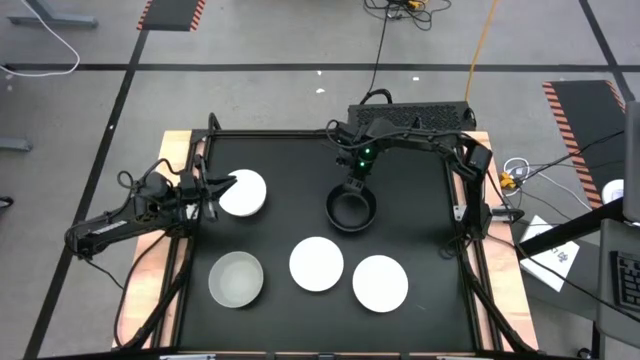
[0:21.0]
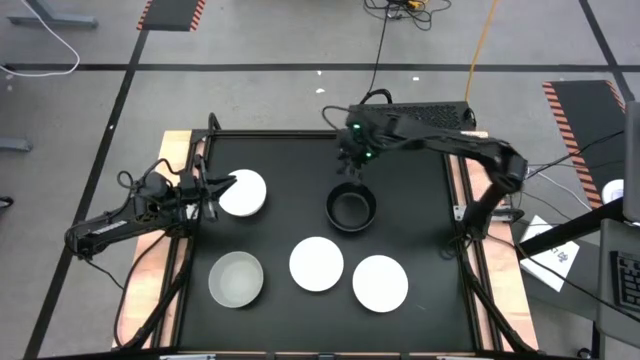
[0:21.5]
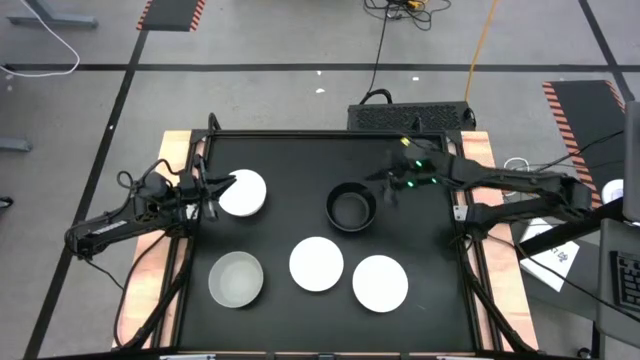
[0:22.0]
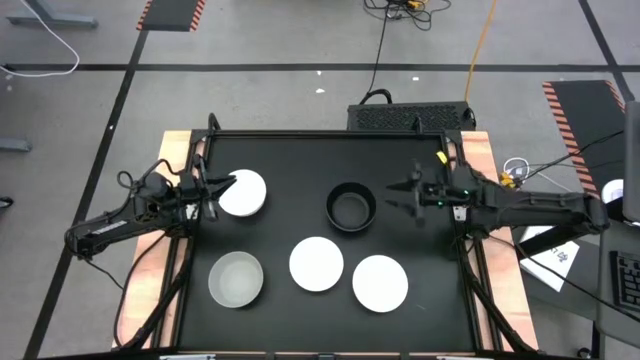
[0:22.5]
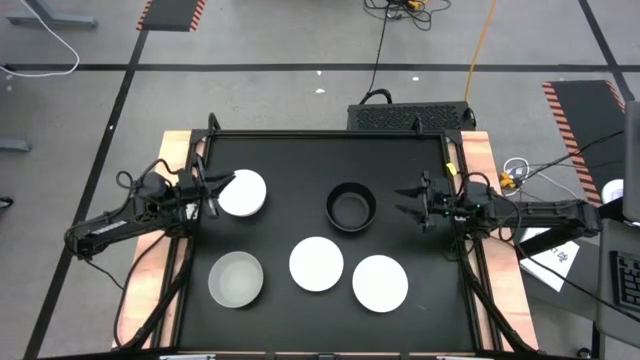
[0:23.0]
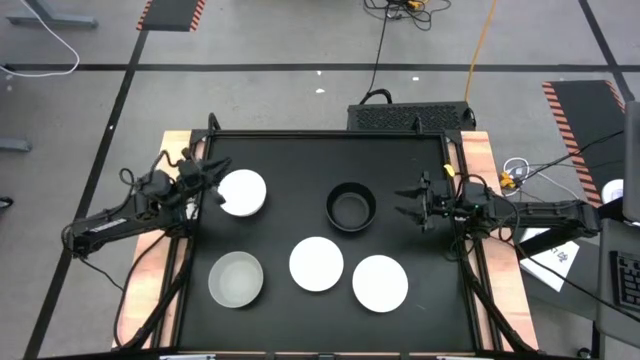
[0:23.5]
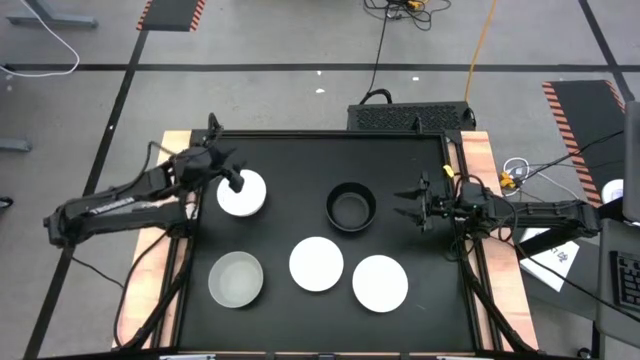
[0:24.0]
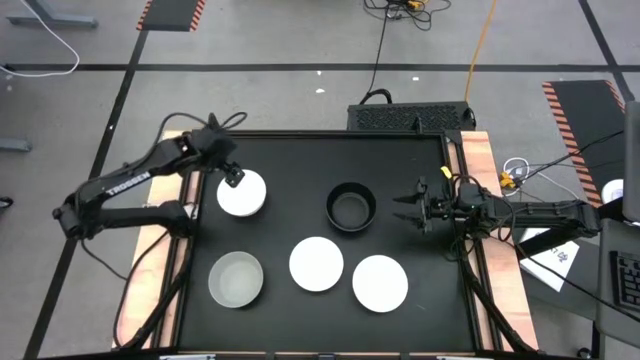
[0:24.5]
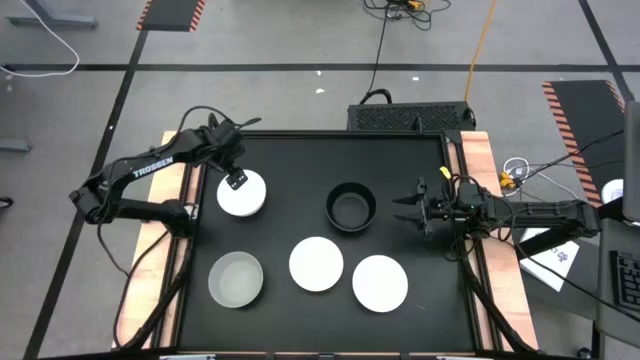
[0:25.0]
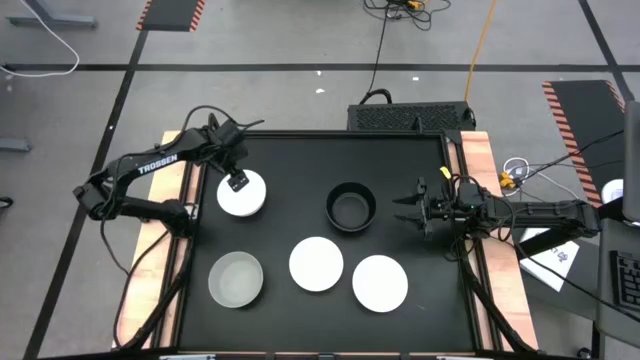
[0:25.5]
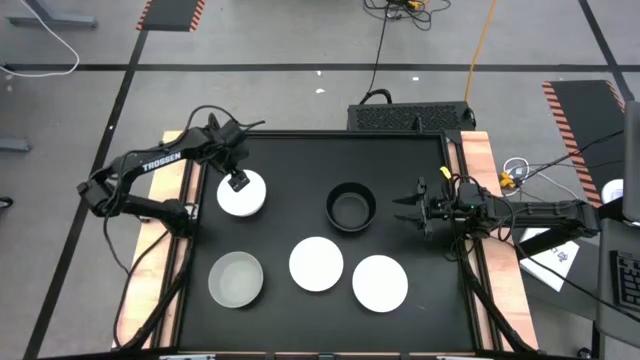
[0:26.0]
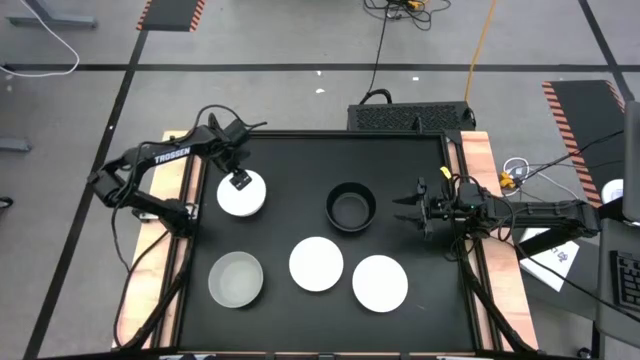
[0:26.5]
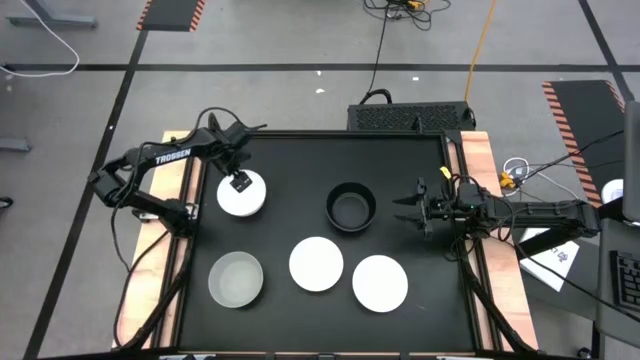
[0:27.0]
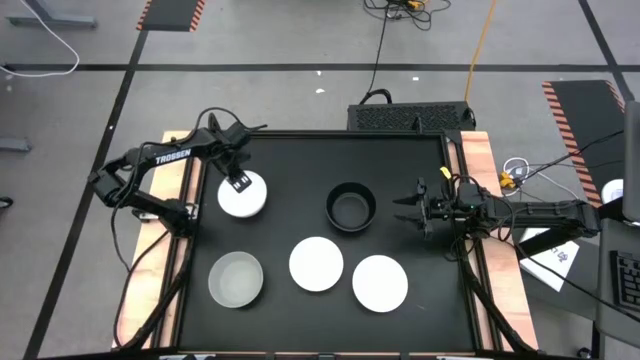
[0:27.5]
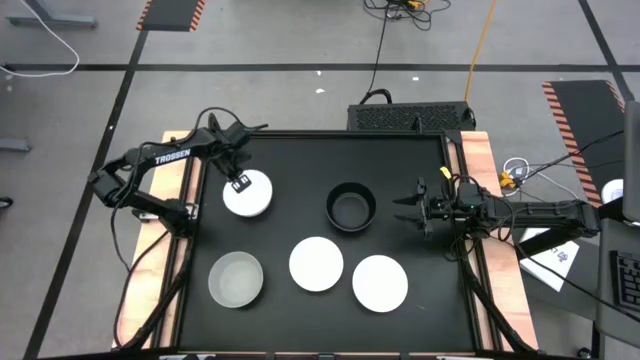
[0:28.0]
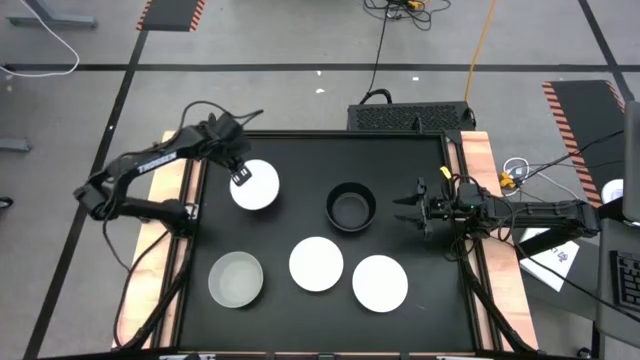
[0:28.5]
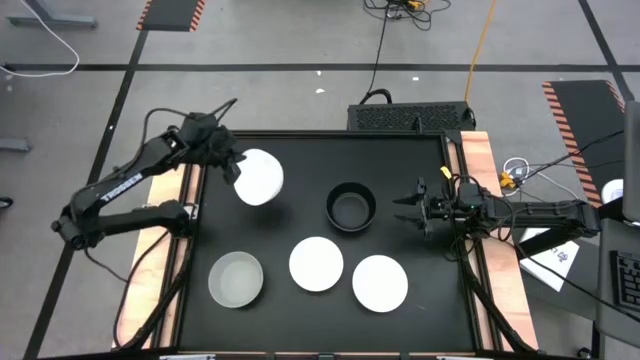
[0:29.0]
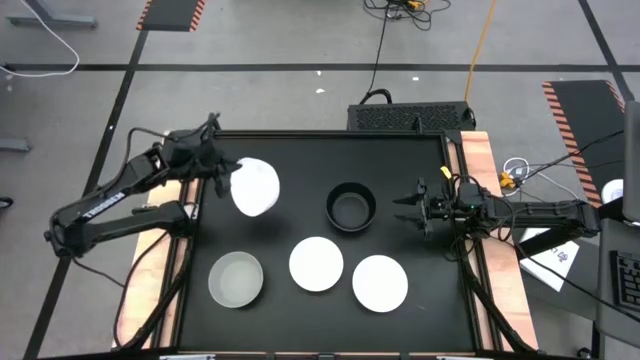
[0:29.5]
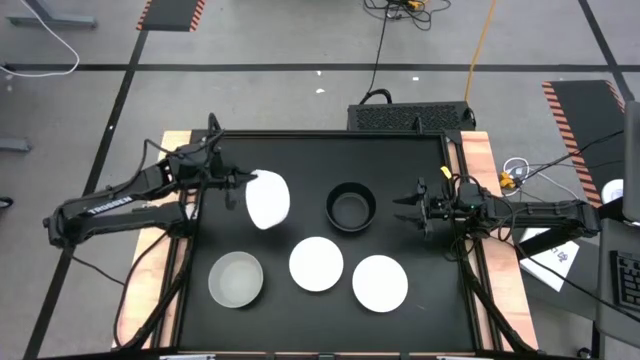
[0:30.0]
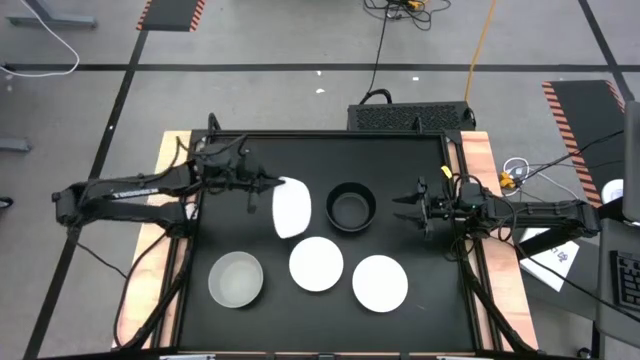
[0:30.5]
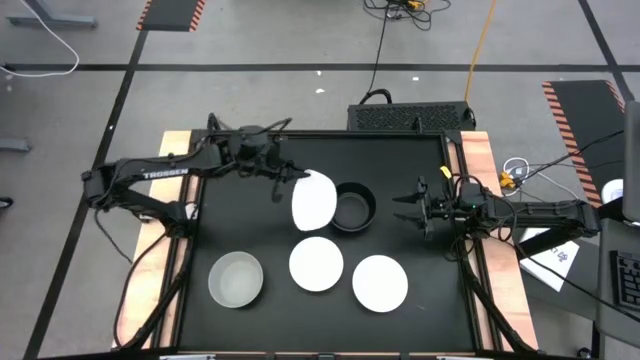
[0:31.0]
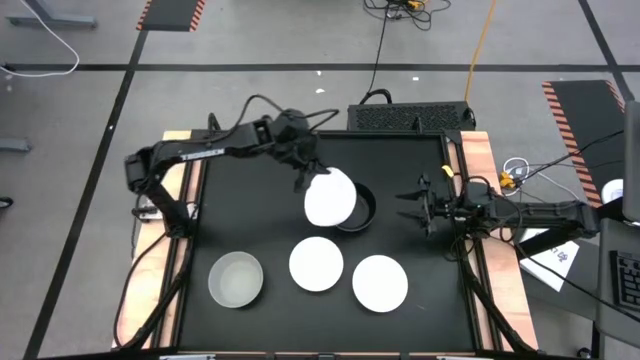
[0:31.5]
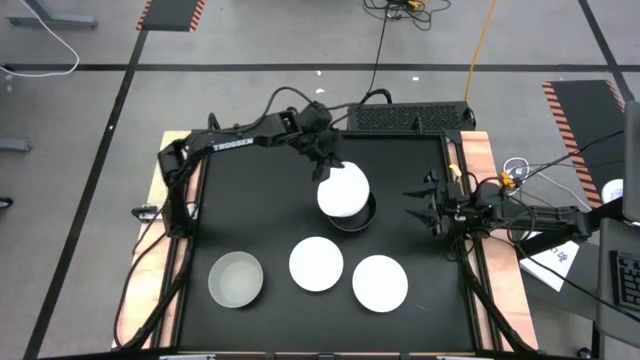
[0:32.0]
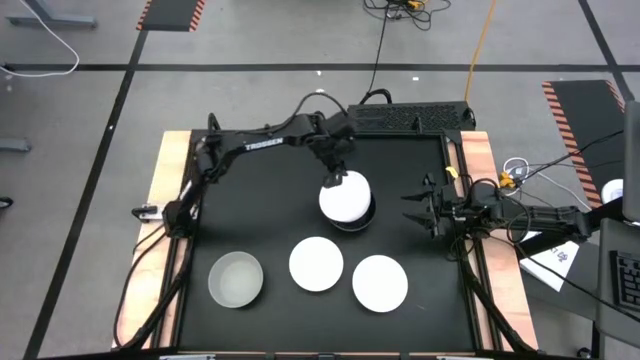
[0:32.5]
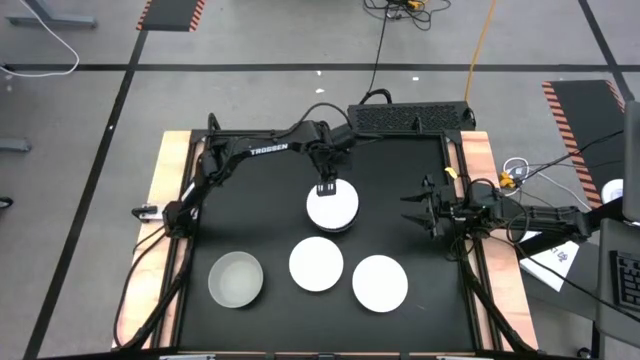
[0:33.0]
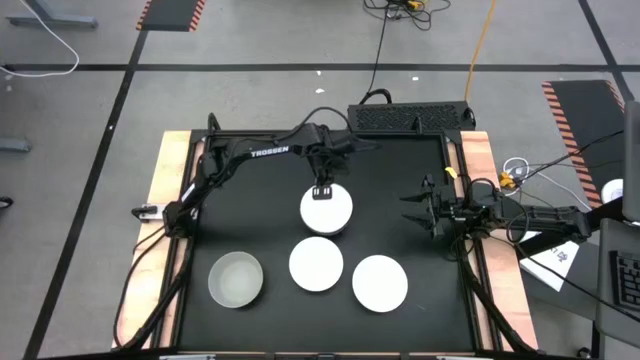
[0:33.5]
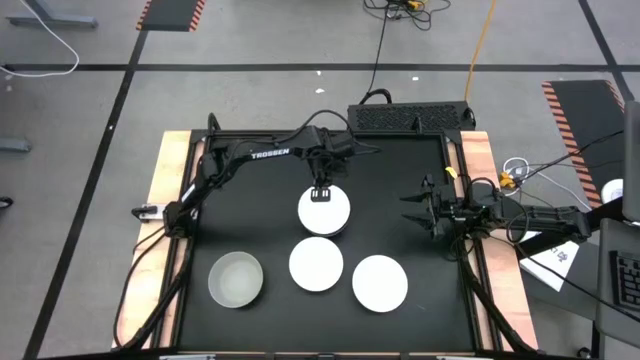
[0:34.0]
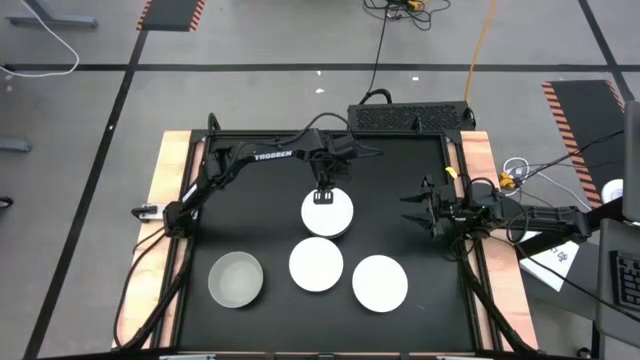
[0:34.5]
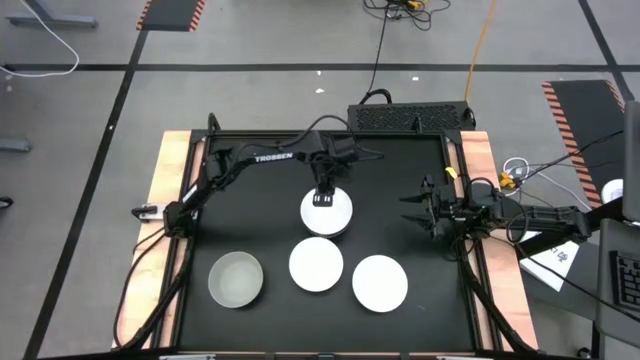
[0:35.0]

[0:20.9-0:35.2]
Task: Nest bowls inside each other
Stack the top left white bowl on the black bowl

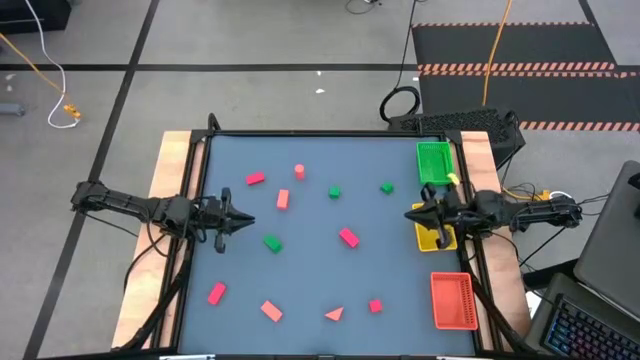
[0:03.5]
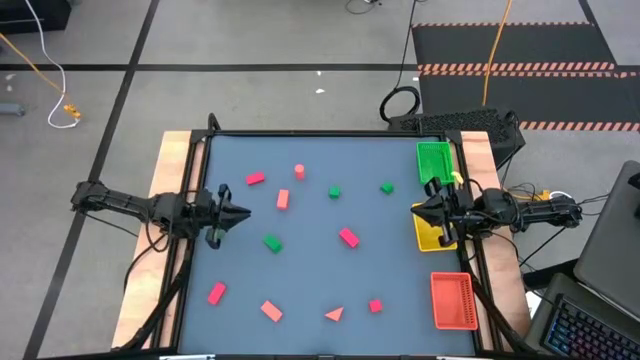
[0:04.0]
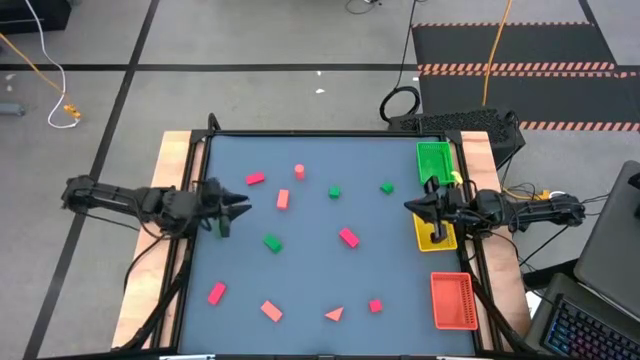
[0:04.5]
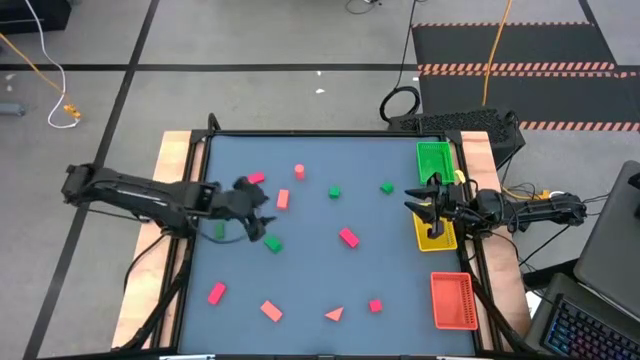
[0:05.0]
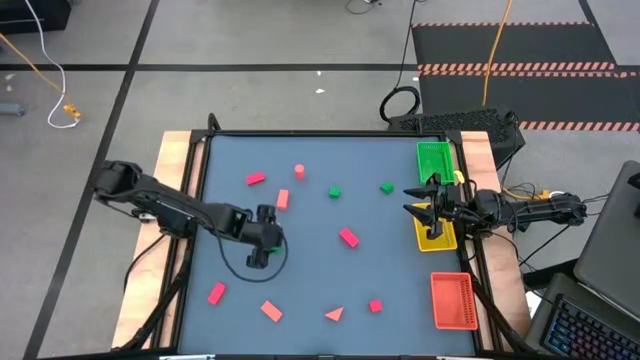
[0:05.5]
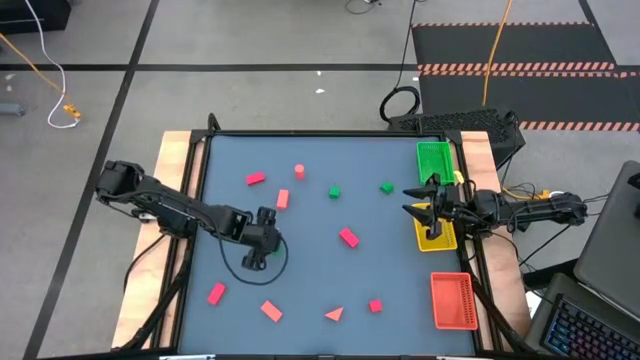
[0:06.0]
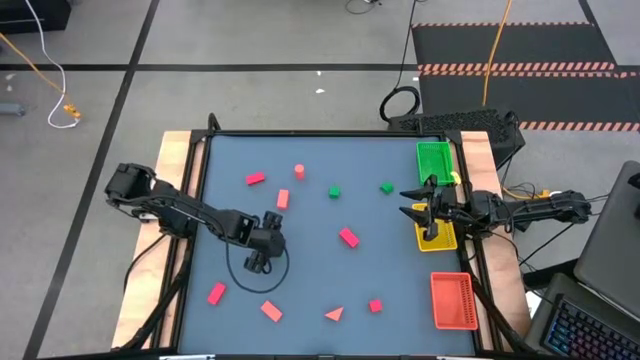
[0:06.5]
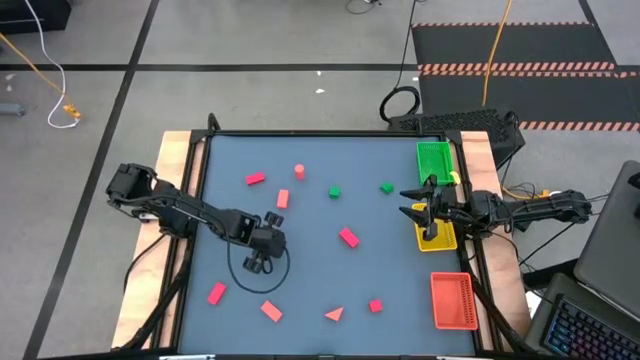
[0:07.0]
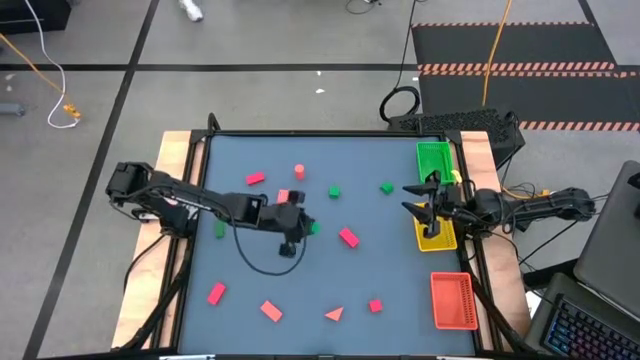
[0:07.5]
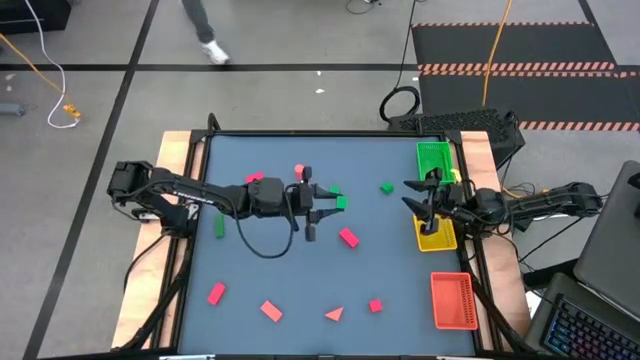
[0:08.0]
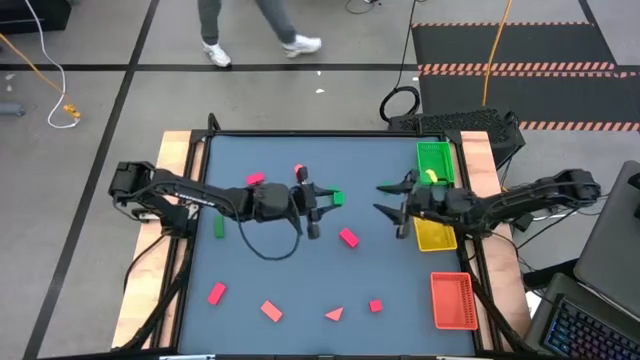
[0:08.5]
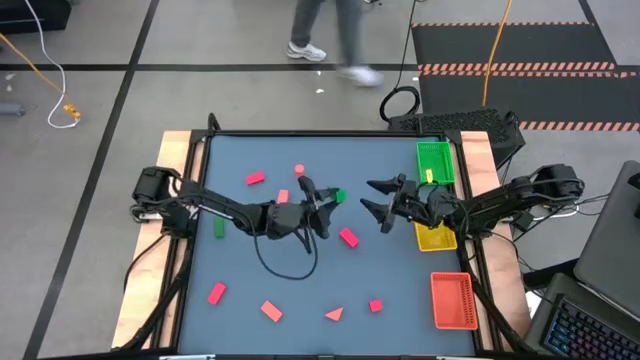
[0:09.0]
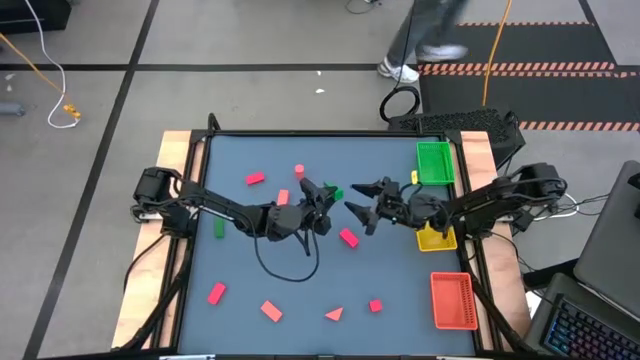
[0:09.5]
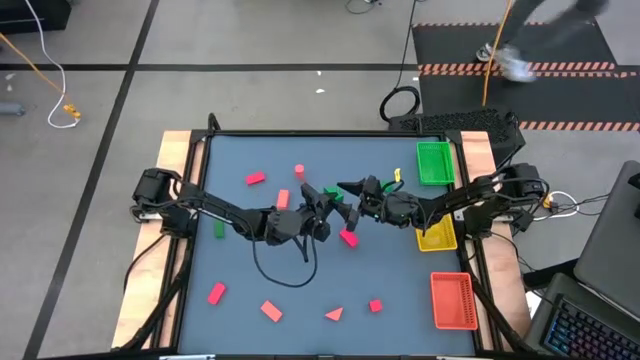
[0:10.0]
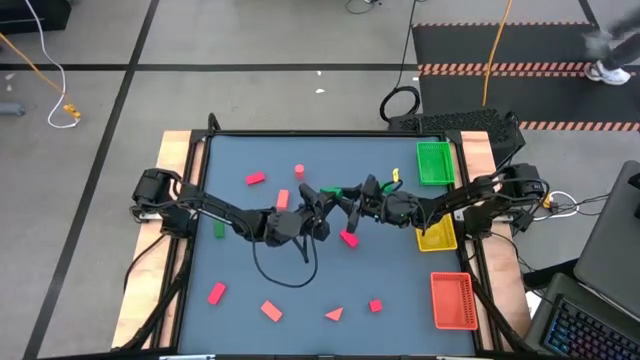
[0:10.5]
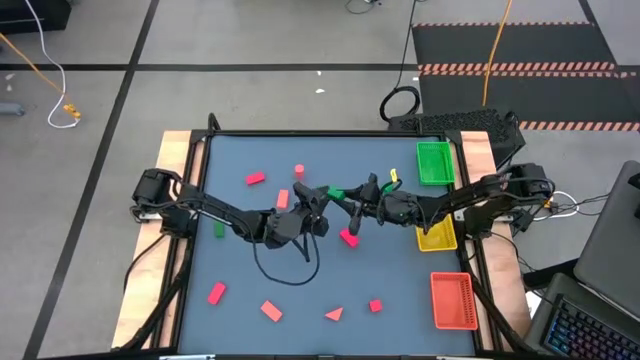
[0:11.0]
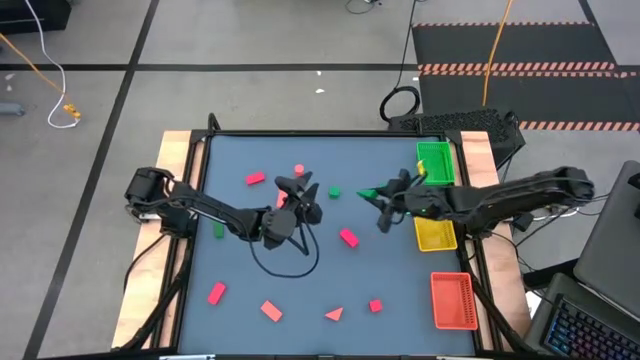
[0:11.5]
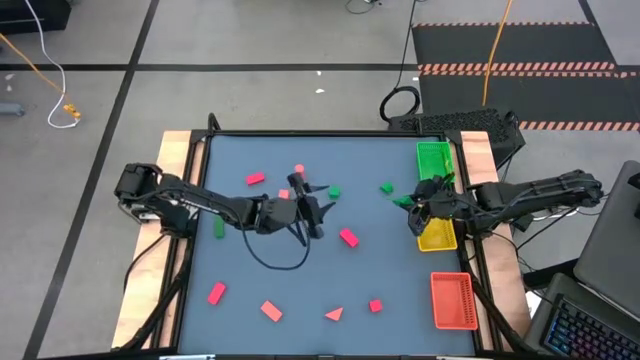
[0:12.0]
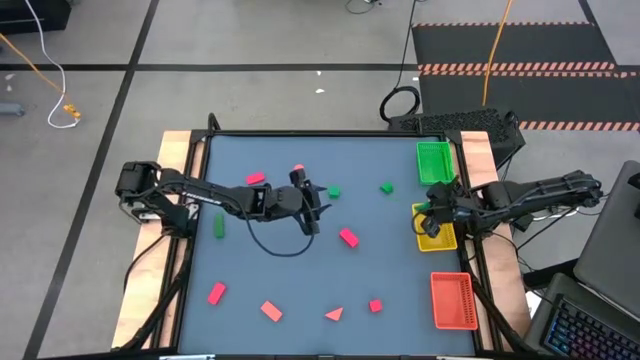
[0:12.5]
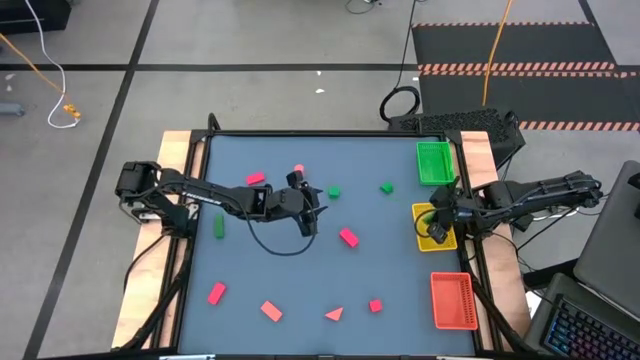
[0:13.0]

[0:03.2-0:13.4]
Task: Sort & place blocks by color
Put the bottom center green block into the yellow basket
